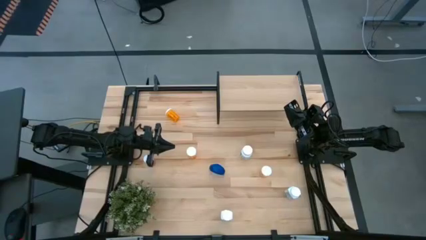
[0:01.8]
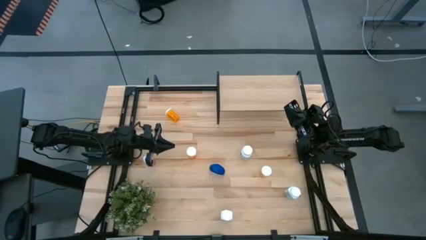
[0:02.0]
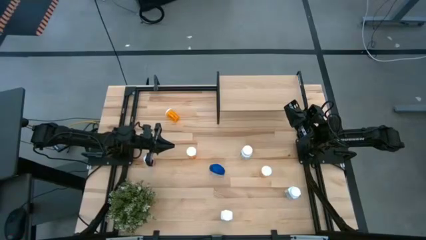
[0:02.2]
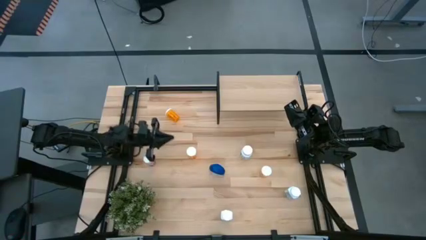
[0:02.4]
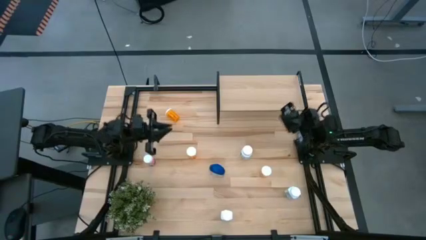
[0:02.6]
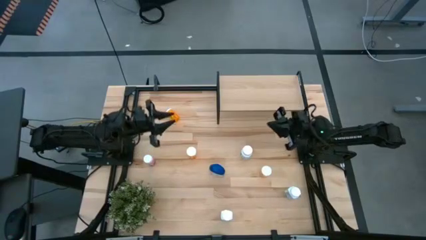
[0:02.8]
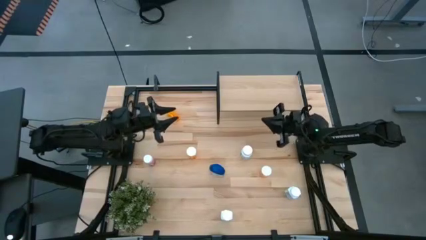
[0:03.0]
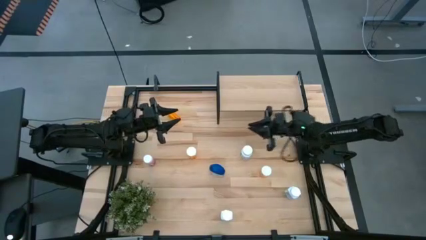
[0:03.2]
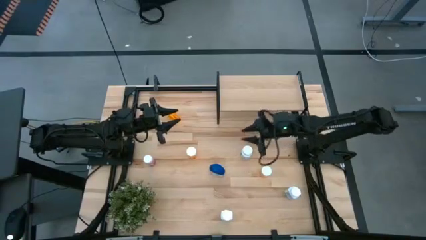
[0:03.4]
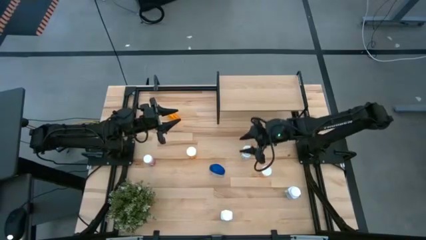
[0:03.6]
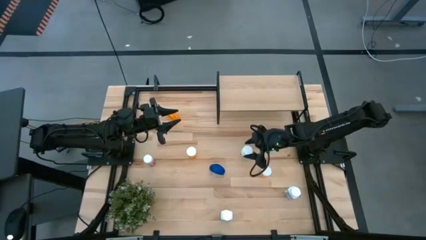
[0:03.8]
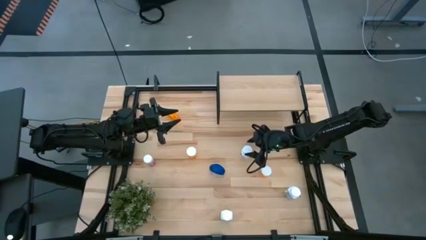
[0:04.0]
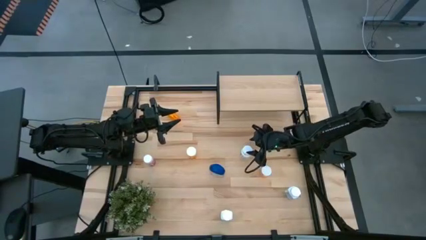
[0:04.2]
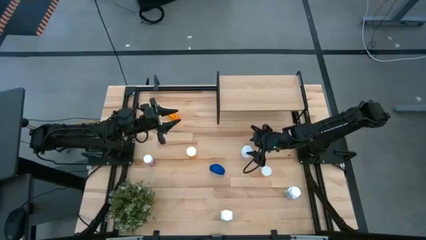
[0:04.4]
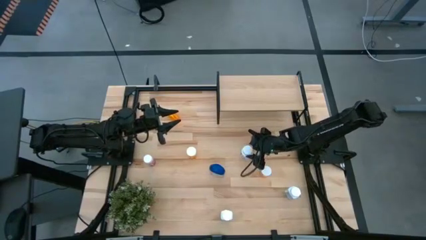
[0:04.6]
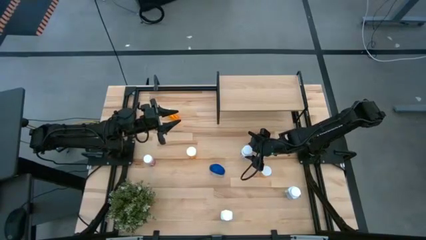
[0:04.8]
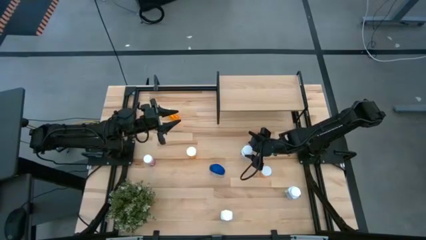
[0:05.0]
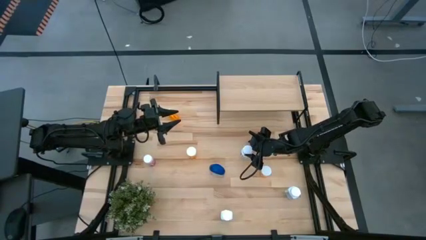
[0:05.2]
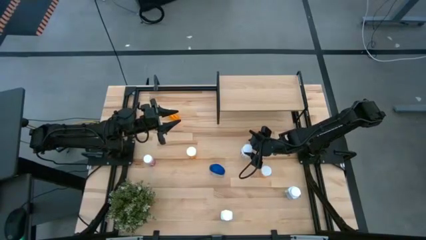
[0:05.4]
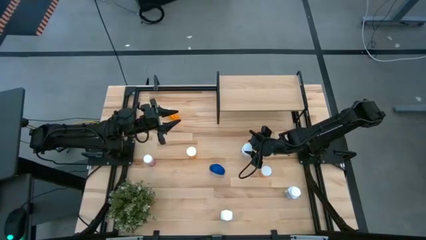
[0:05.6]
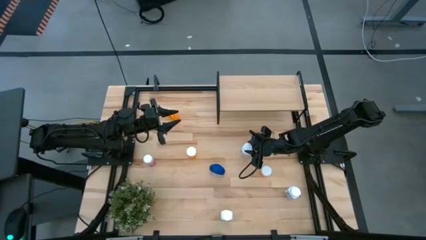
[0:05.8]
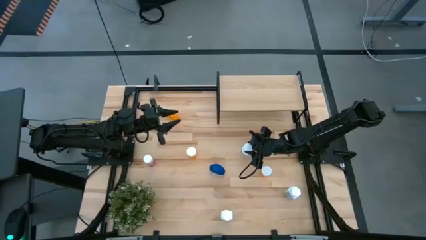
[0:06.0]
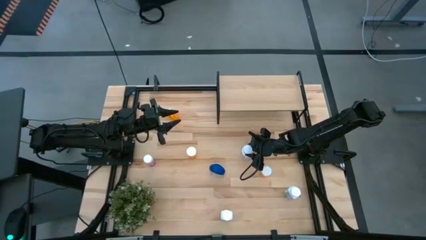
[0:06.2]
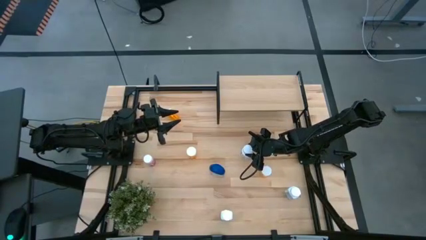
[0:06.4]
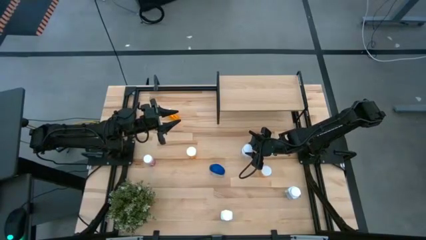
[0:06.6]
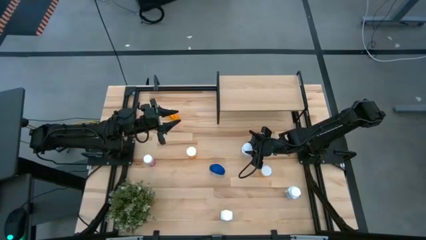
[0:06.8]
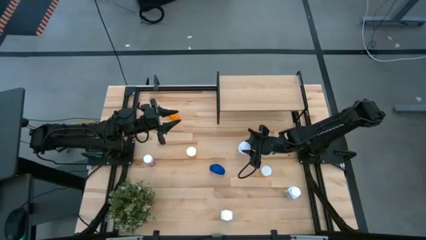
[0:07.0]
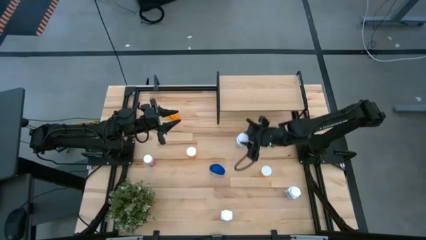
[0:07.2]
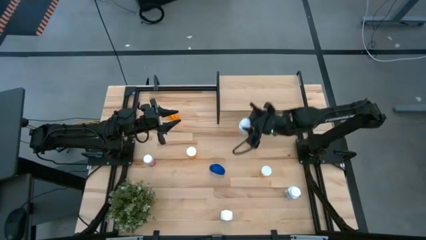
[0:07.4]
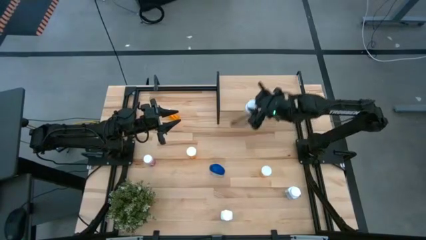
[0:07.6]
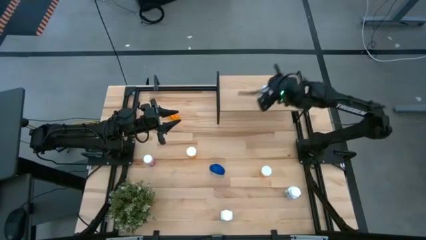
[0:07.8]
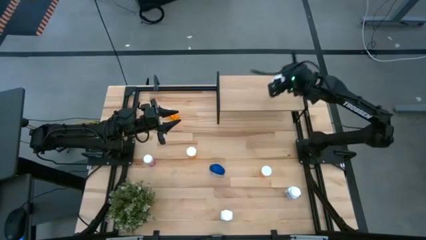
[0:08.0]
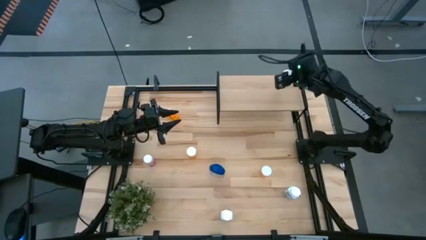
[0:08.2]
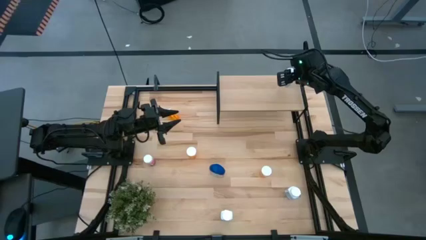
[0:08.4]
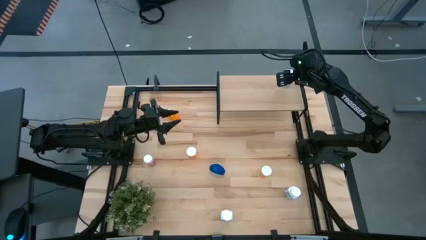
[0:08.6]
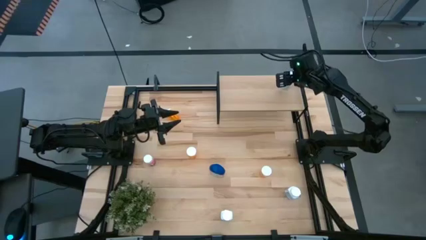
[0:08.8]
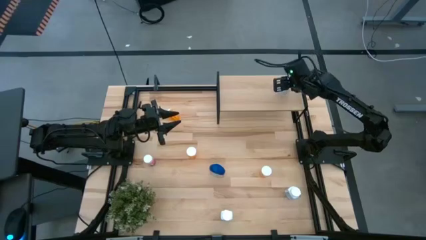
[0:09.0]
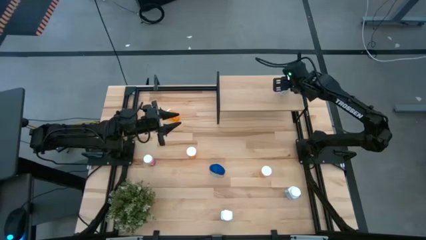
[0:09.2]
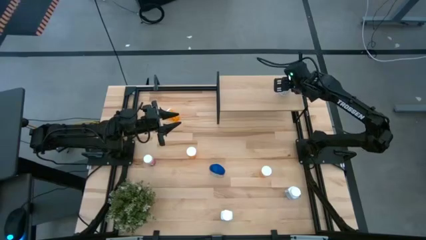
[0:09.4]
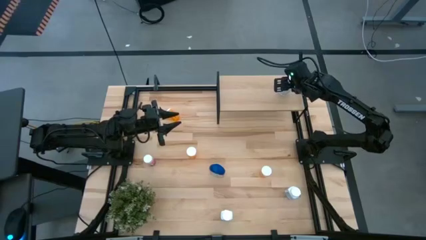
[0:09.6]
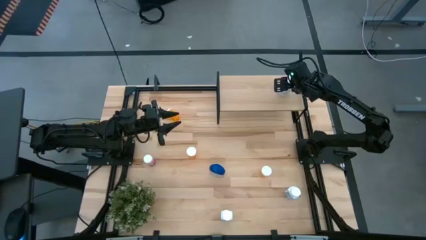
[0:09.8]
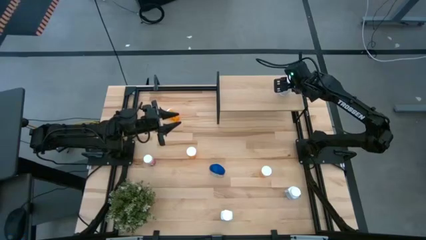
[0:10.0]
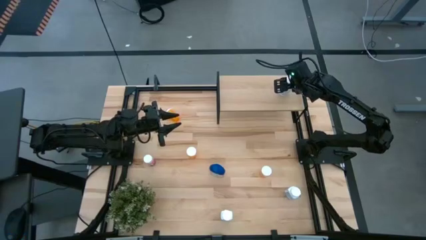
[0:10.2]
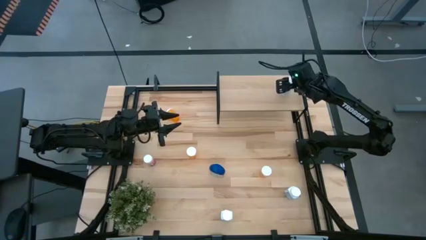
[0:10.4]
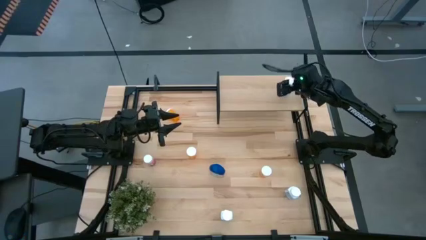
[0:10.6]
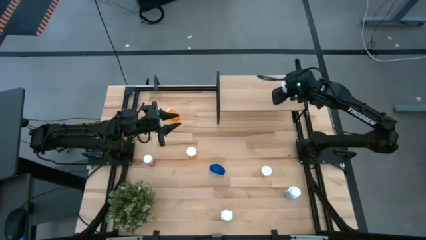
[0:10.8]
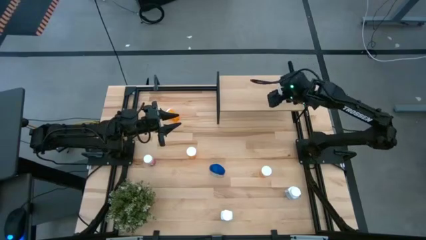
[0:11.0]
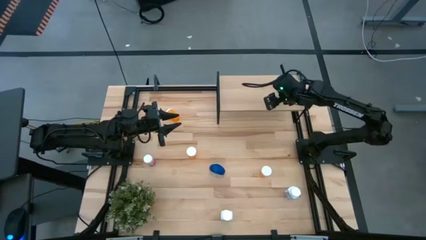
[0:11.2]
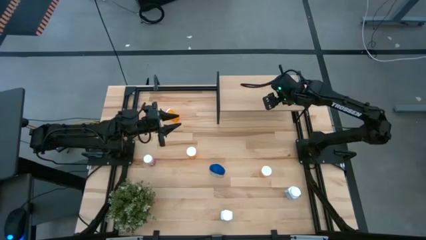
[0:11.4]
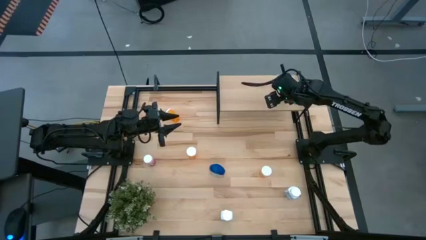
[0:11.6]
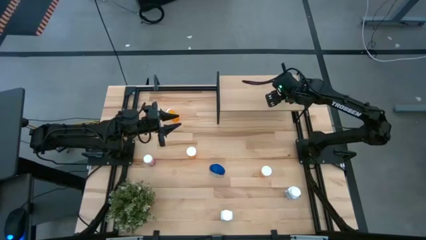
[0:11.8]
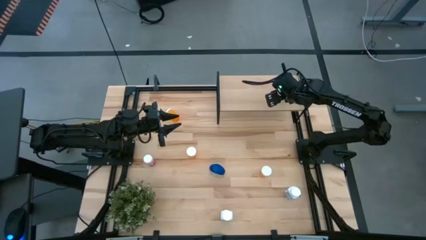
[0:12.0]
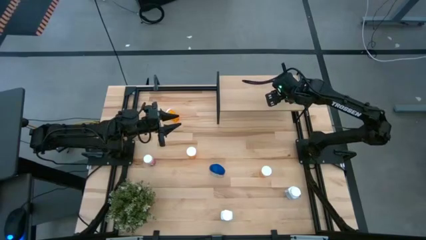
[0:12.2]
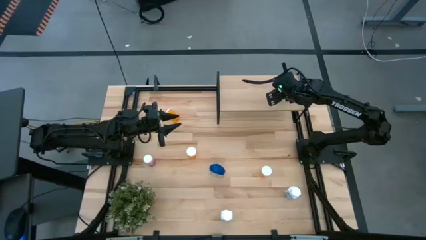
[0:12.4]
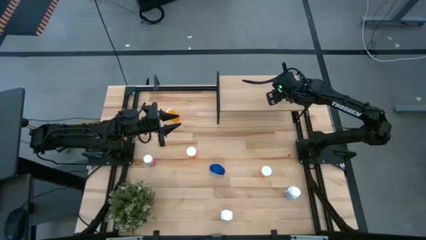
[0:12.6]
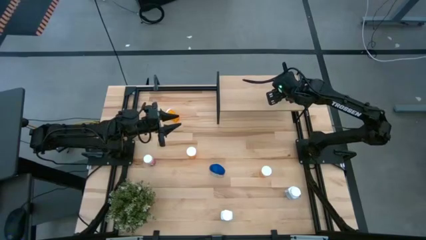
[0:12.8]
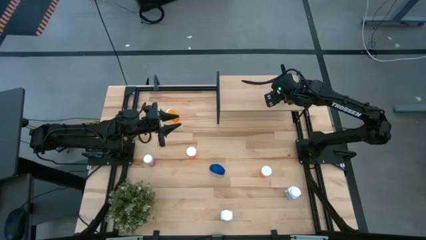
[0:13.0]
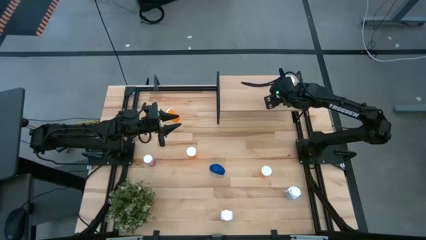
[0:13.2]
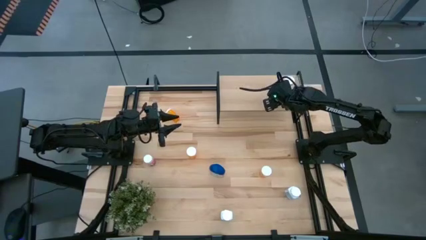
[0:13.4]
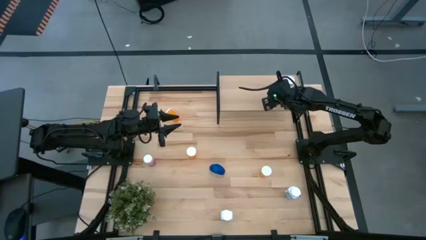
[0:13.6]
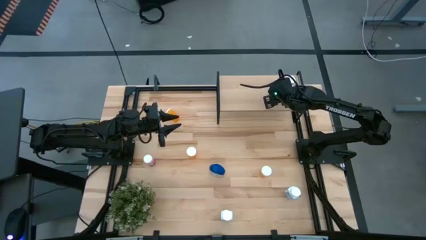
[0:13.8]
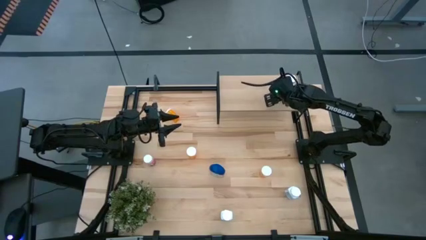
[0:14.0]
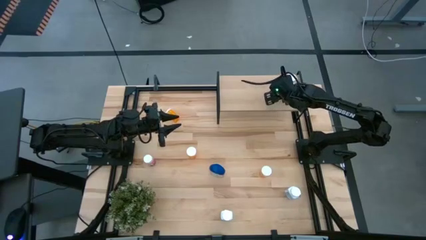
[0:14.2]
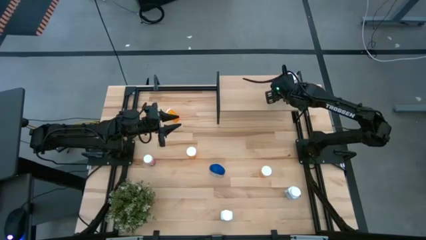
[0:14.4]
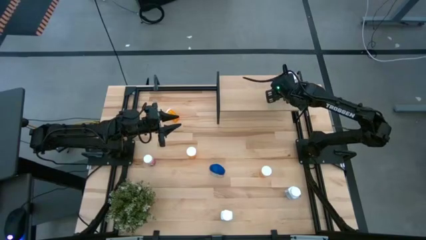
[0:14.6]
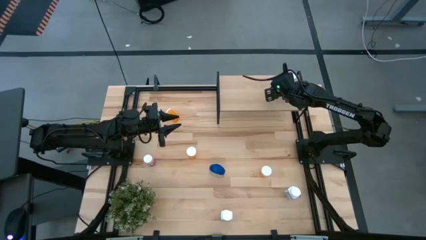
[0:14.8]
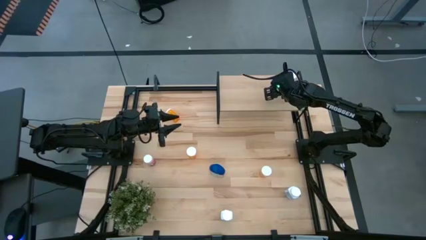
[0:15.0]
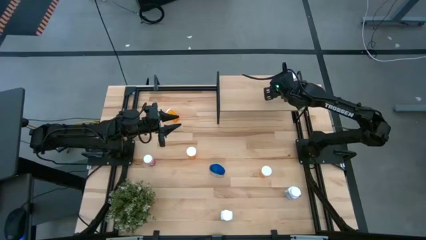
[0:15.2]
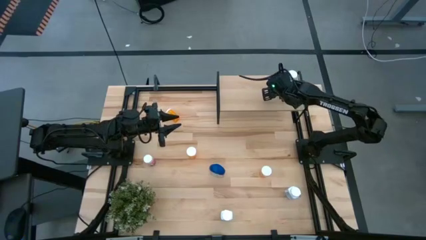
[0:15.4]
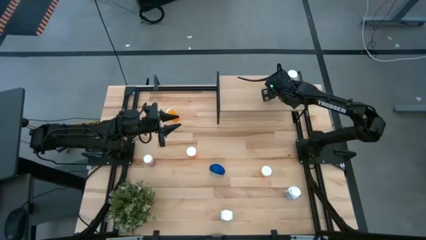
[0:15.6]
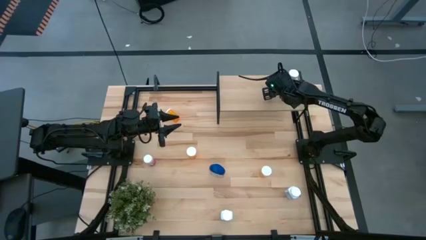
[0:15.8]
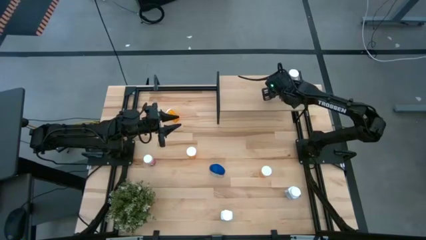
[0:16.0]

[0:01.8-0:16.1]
Task: Pick and place medicine bottles onto shelf by color
Put the white green pill bottle on the shelf
